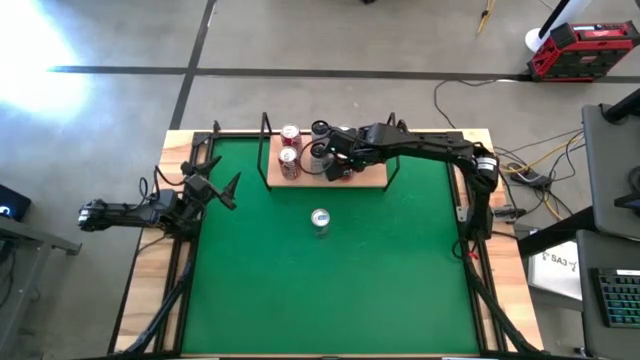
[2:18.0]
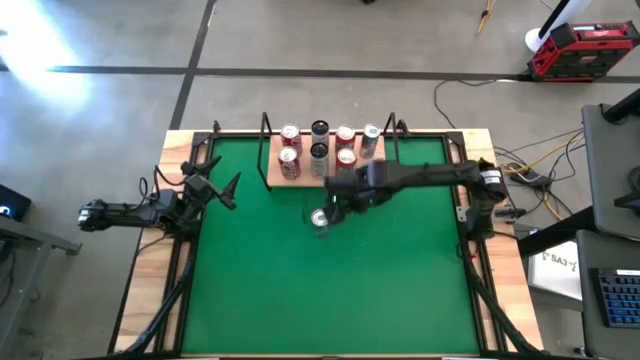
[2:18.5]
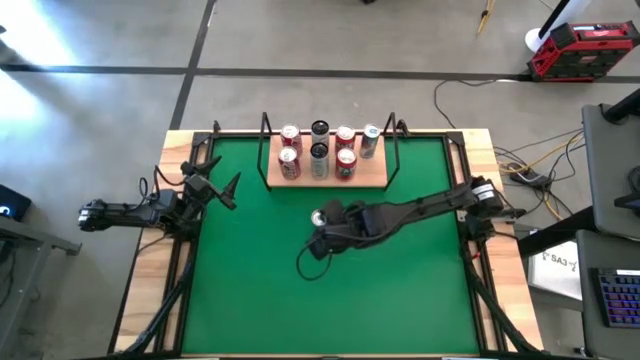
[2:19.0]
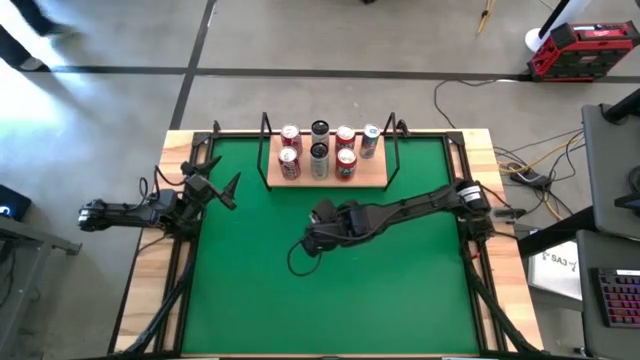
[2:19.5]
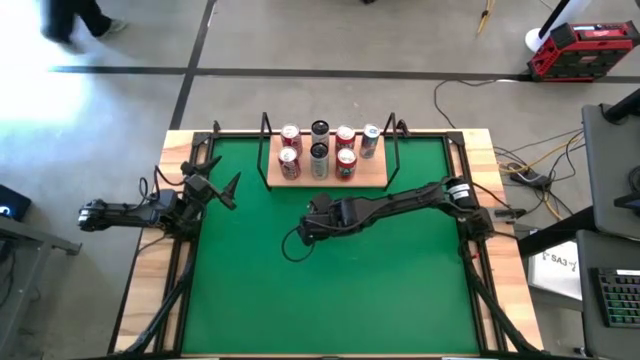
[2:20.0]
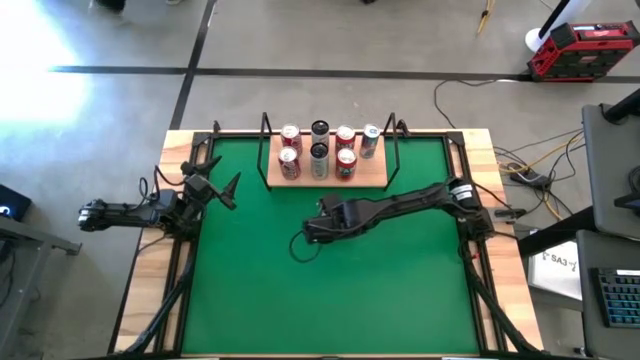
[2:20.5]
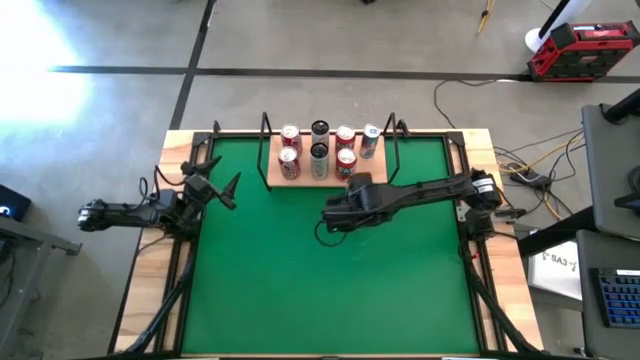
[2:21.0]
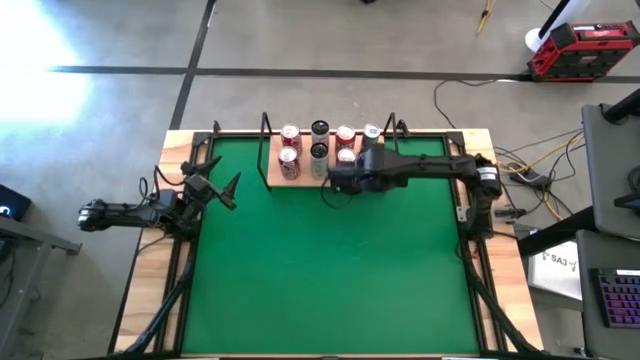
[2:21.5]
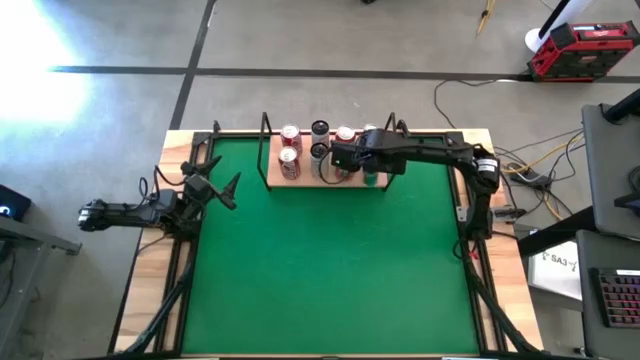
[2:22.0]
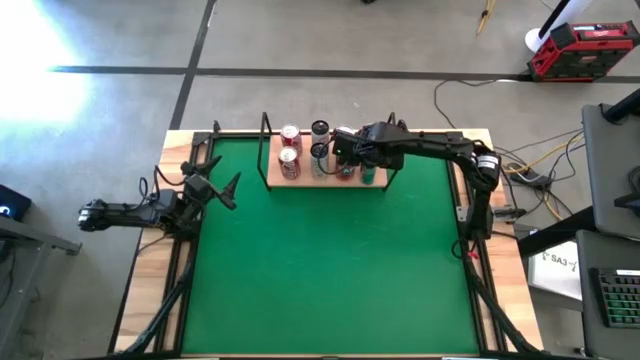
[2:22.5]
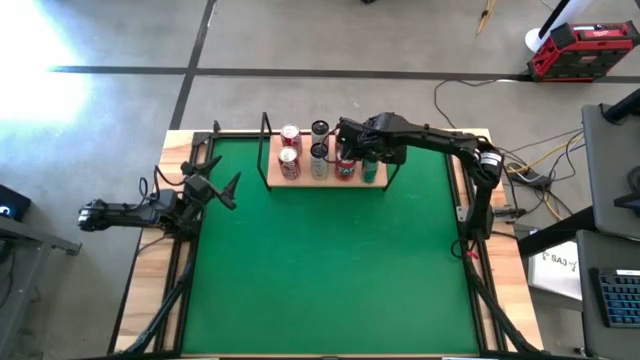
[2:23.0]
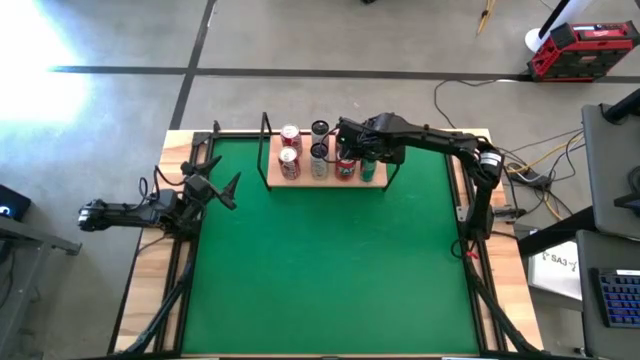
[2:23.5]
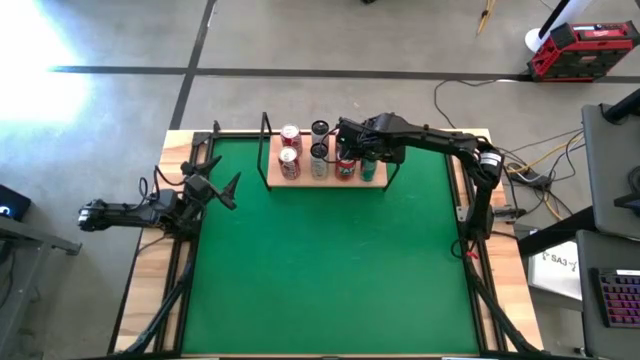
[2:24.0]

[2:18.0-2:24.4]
Task: Place canned beverage on shelf
Put the blue soda can on the shelf aligned with the other blue soda can

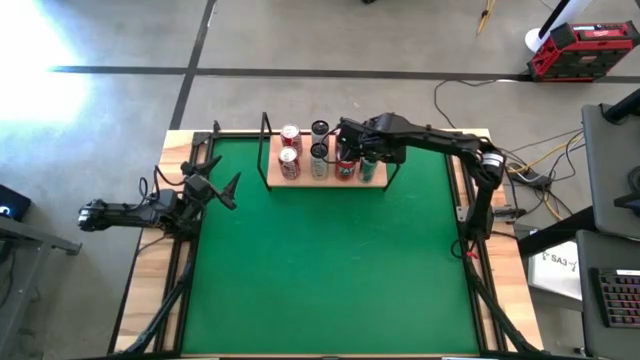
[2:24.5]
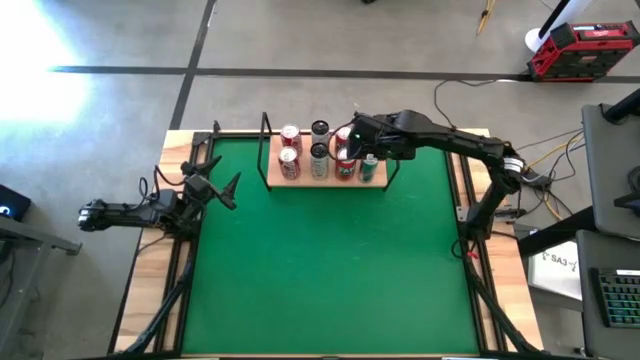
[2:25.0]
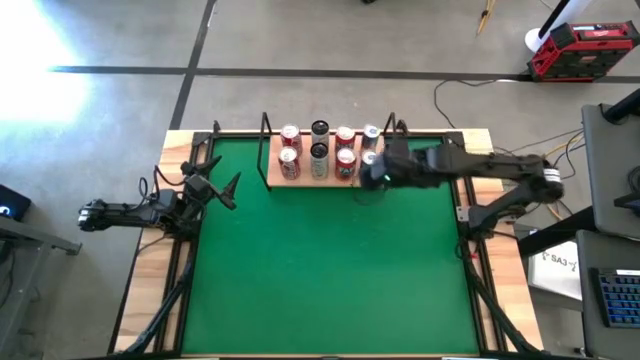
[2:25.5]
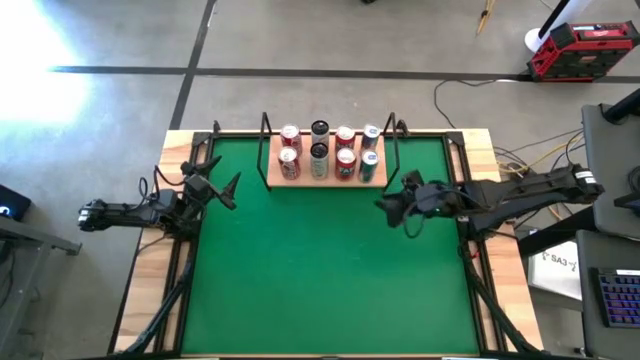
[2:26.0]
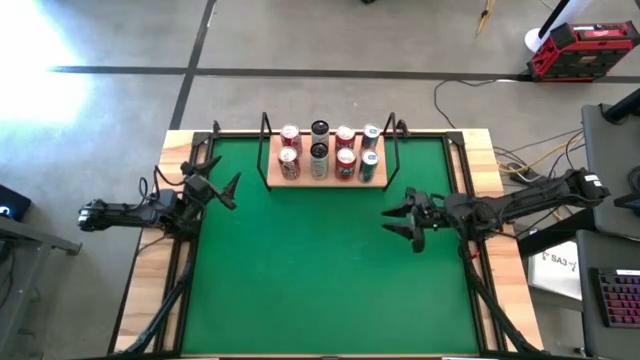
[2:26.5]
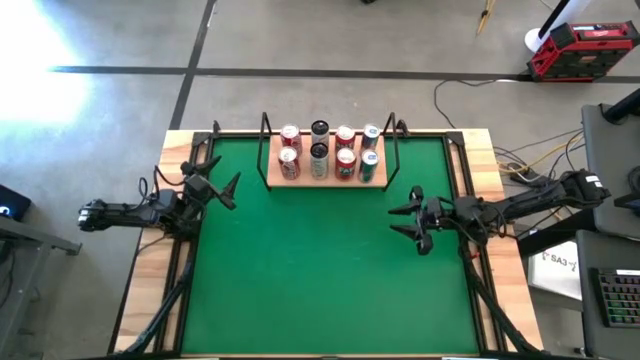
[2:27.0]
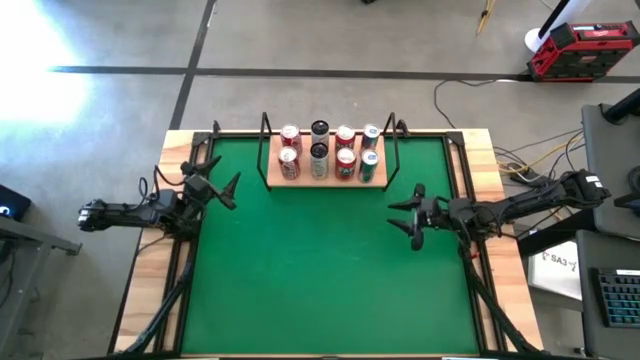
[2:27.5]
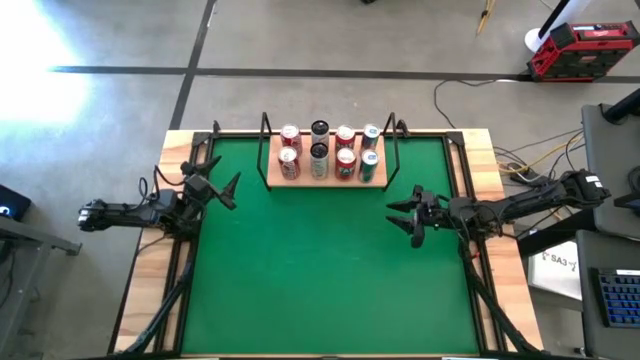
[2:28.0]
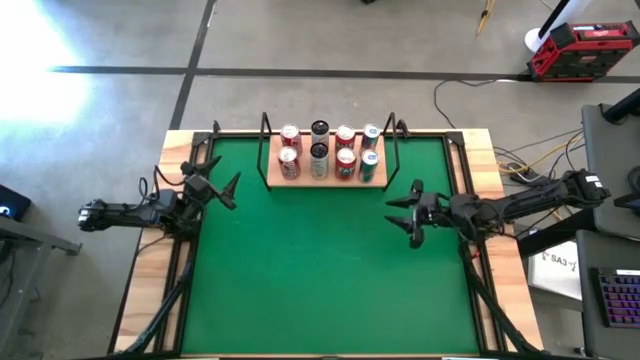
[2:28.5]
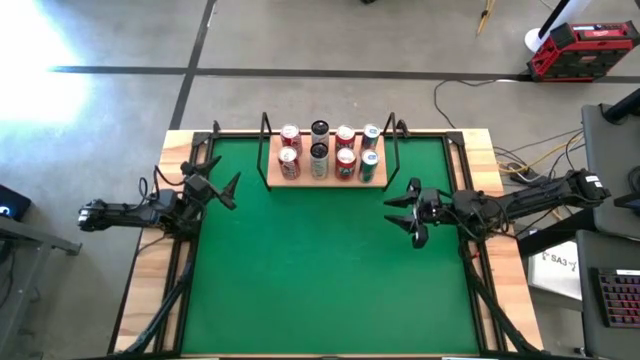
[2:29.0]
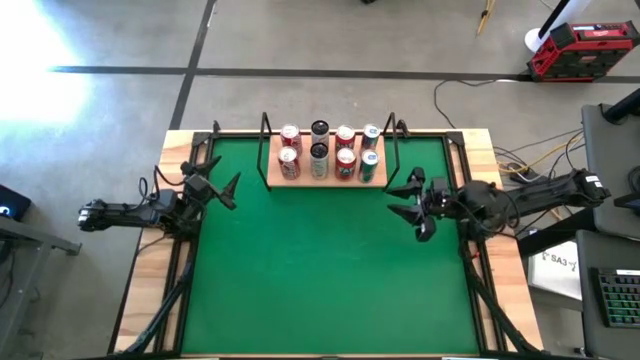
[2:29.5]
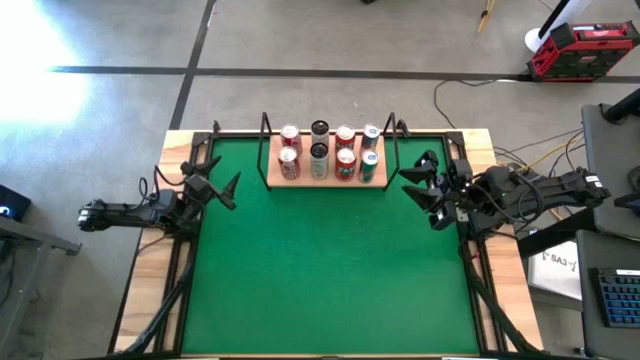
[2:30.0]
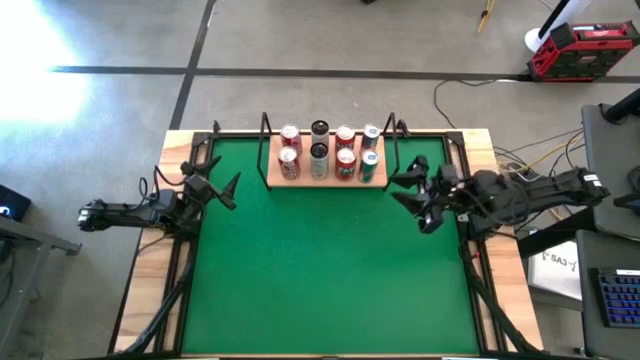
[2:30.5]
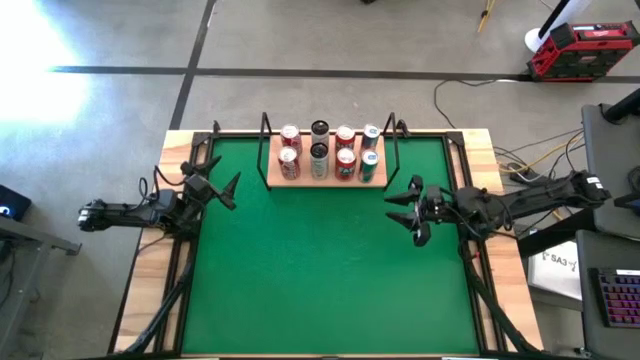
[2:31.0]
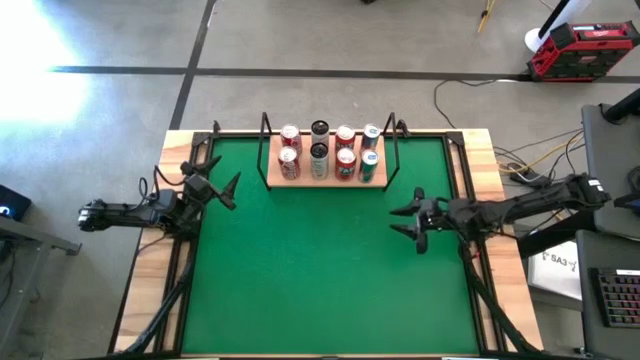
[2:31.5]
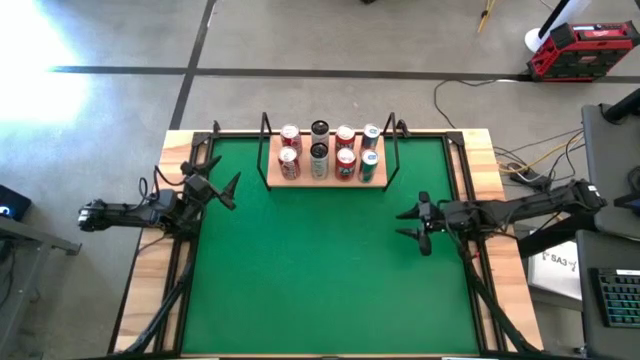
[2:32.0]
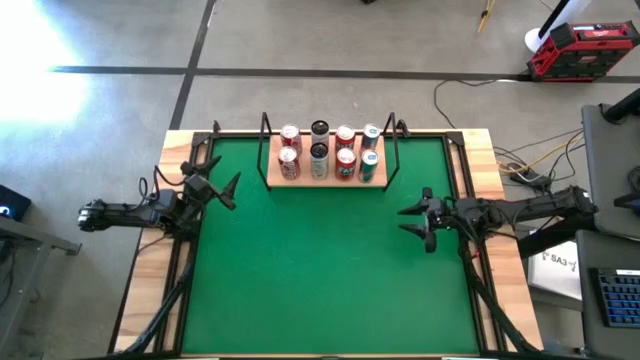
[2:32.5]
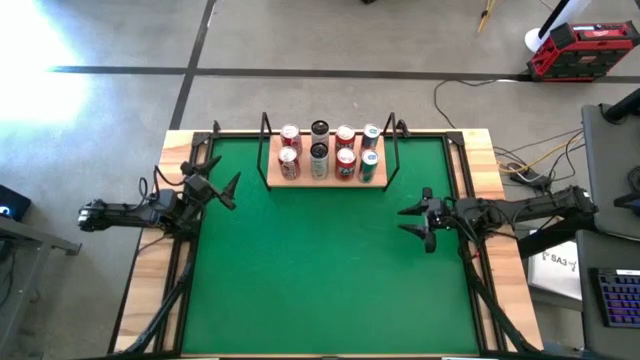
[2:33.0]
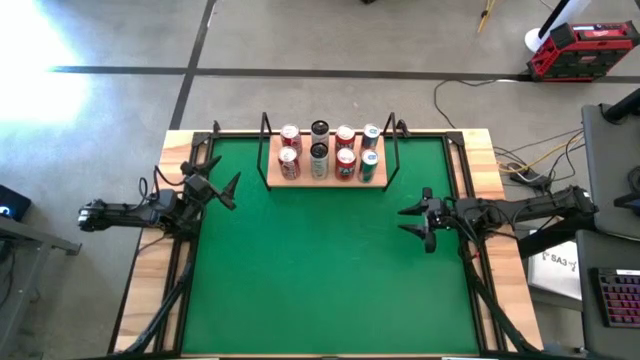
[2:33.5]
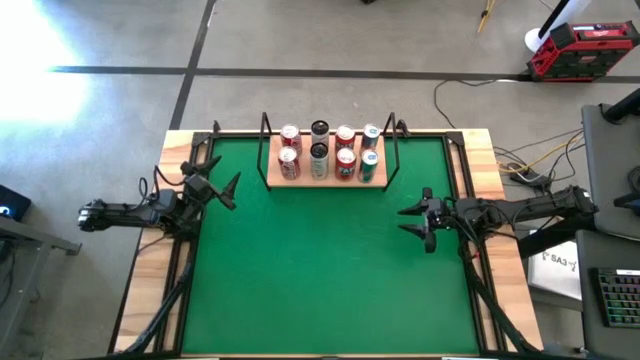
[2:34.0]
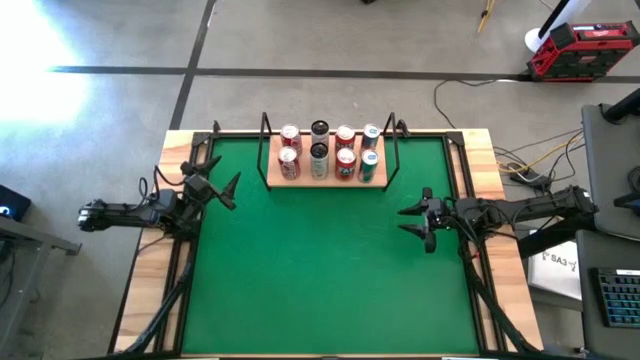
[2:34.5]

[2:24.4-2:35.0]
Return to Home Position
